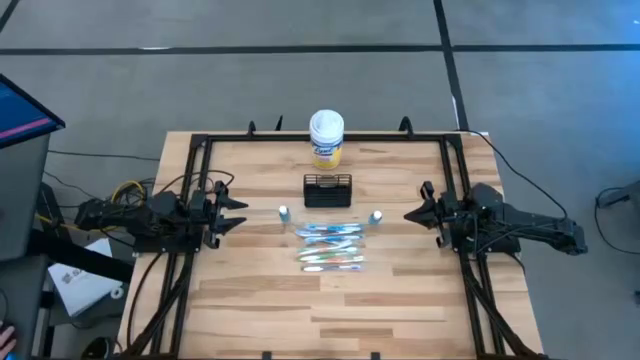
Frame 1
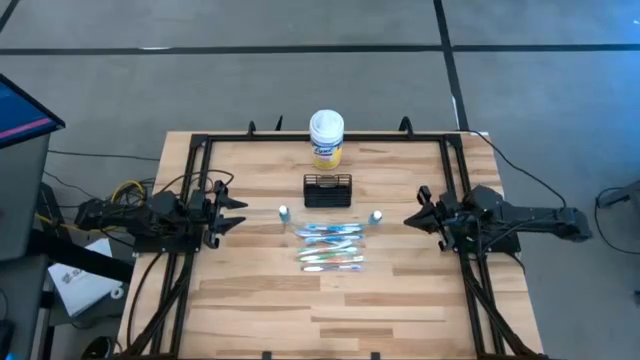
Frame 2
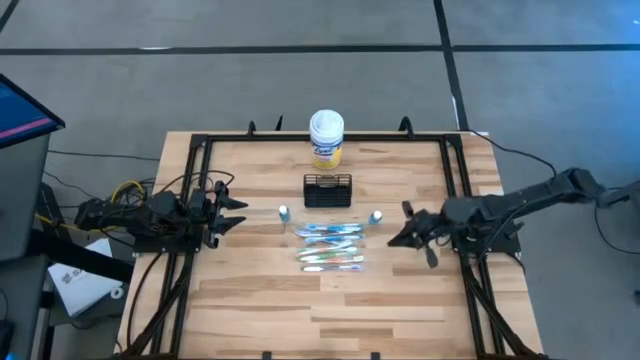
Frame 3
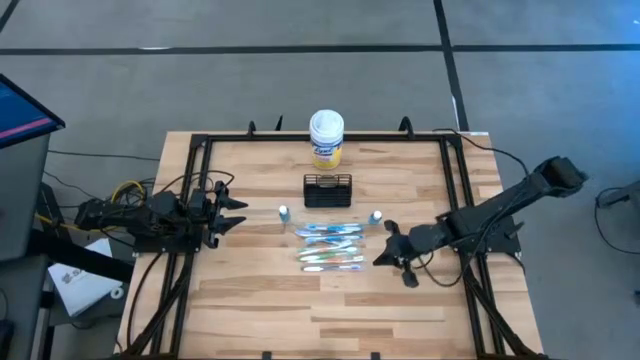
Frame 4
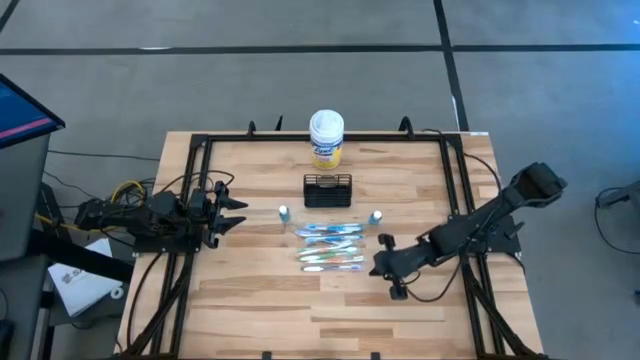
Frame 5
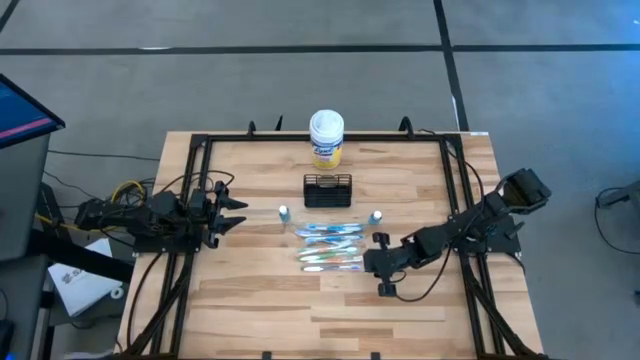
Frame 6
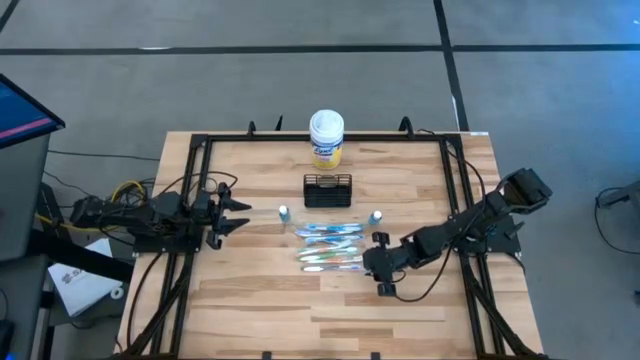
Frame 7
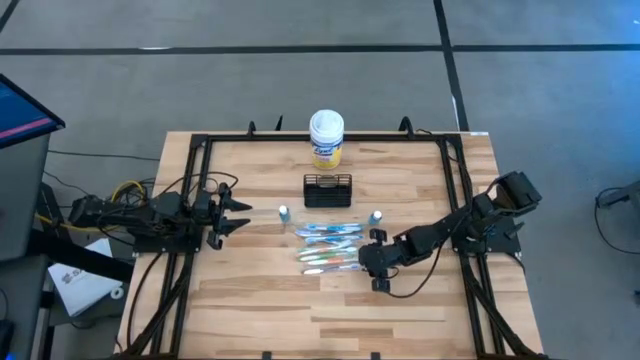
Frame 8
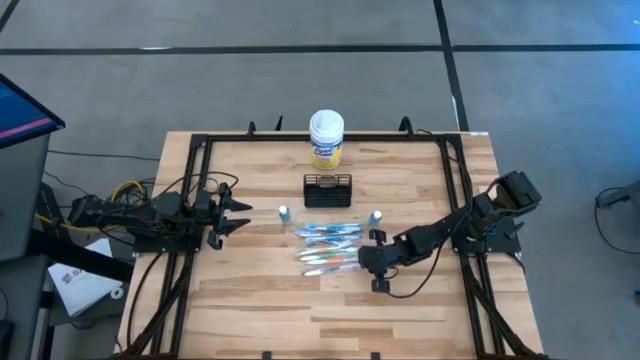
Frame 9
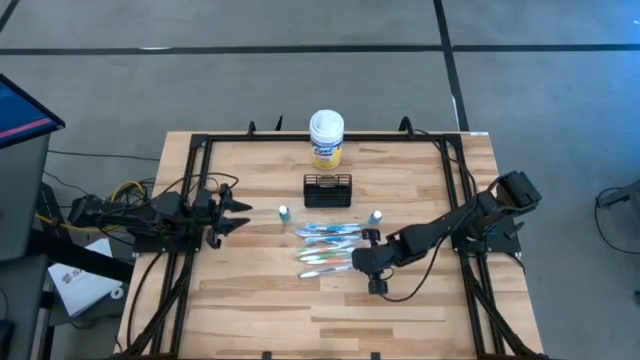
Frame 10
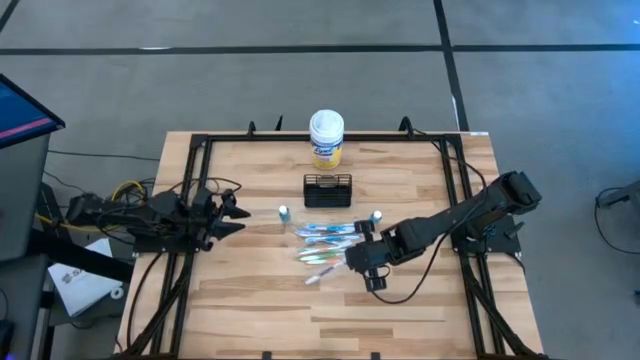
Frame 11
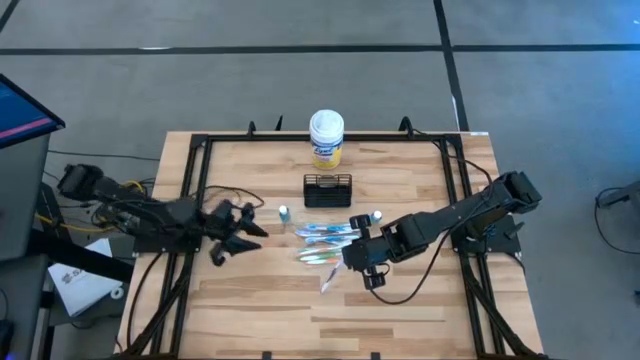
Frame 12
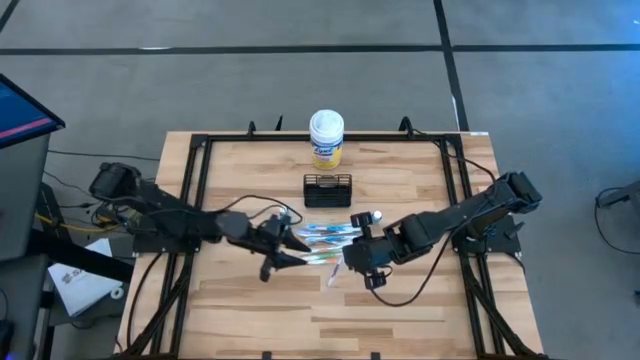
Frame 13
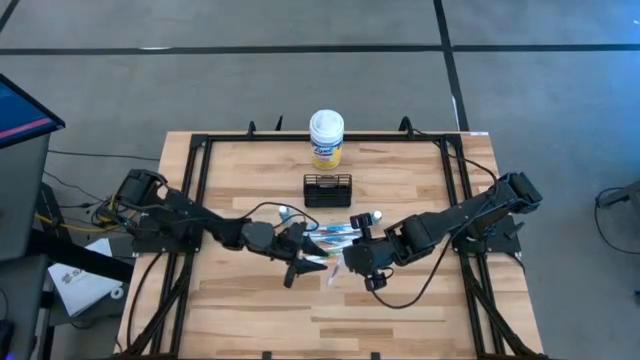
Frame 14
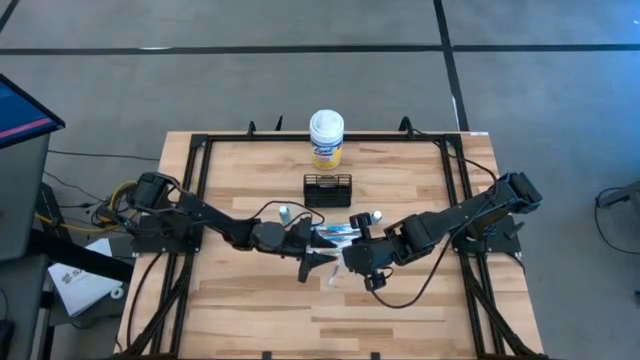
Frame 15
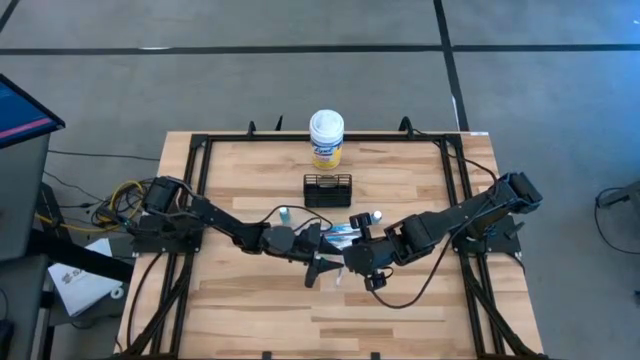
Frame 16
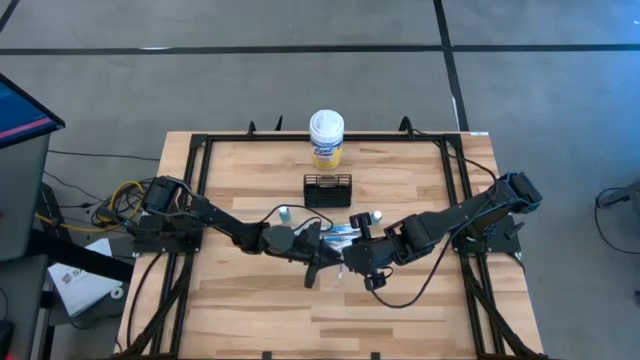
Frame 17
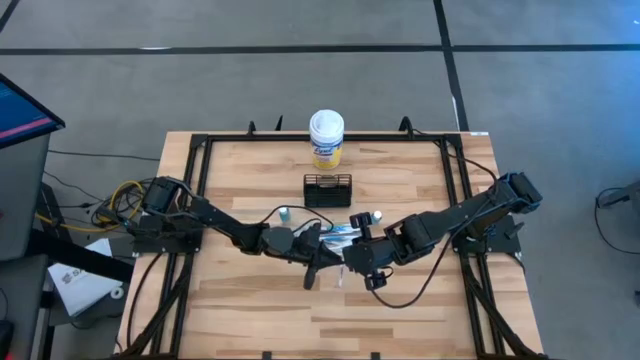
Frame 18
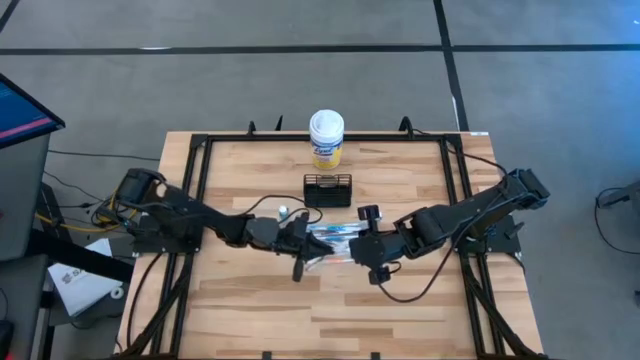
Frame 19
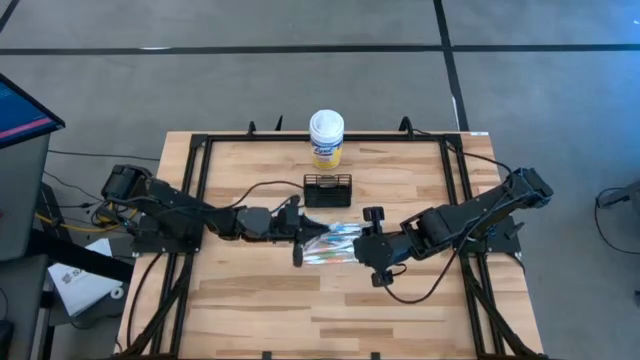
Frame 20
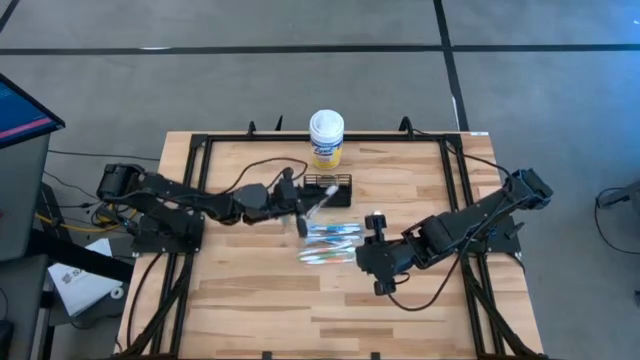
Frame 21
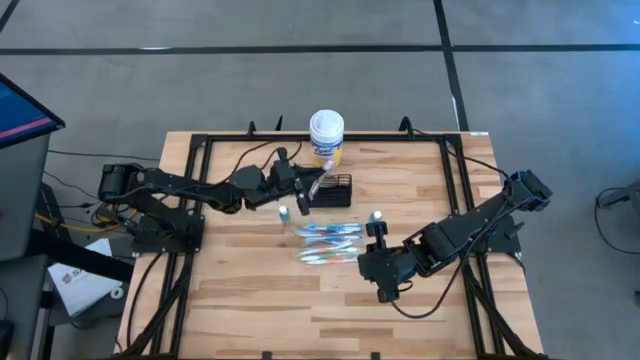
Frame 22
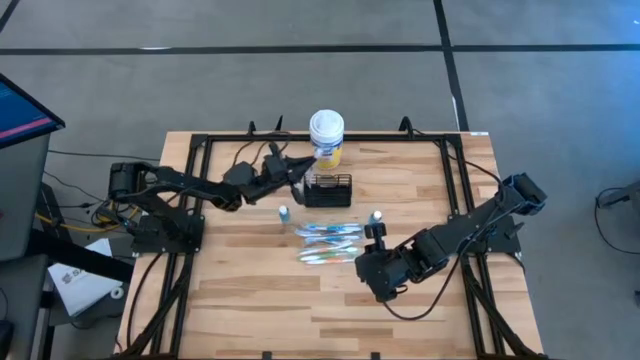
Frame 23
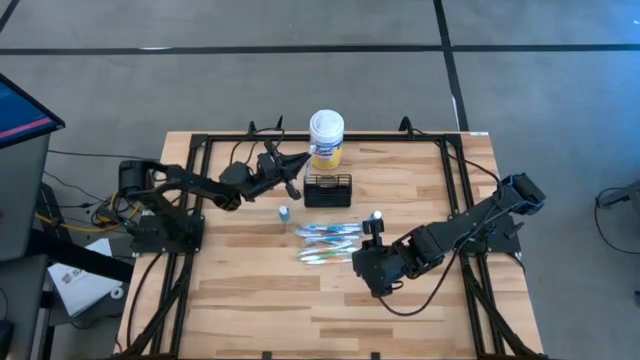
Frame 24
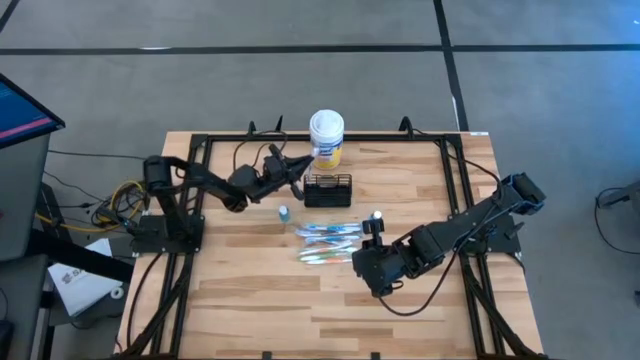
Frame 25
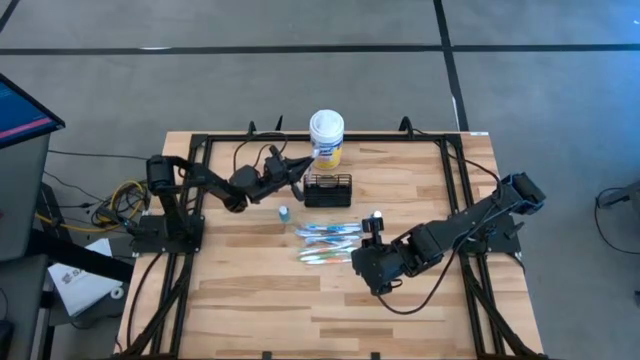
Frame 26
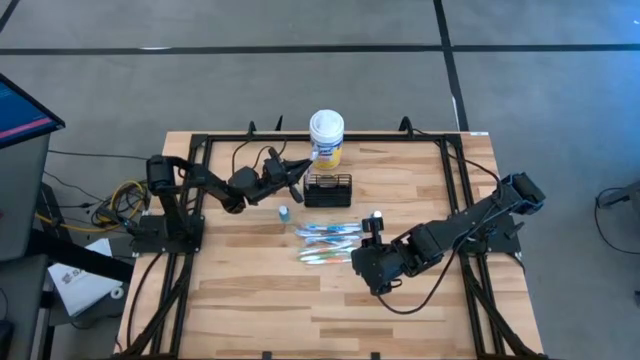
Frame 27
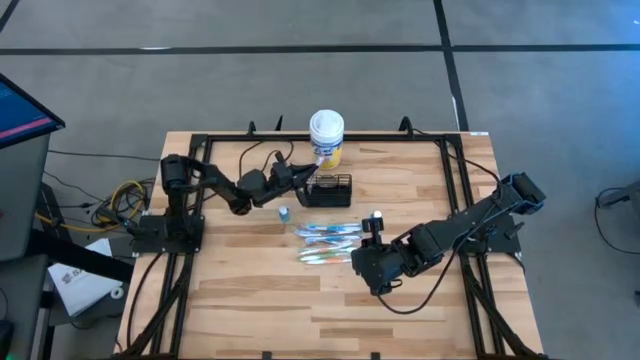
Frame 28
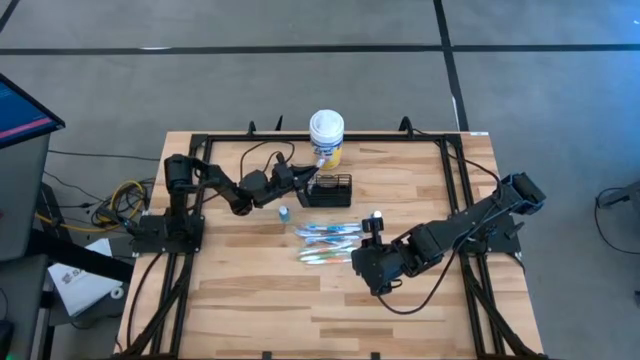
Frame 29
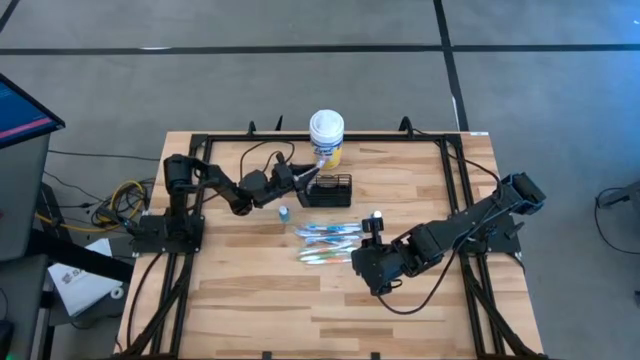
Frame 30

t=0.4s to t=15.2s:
Task: Pick & Place toothbrushing station
Put the violet toothbrush into the black wire organizer

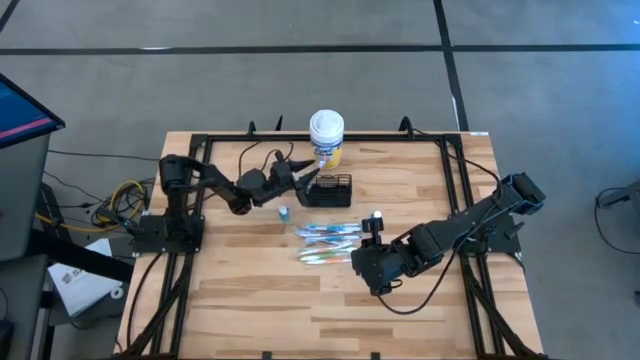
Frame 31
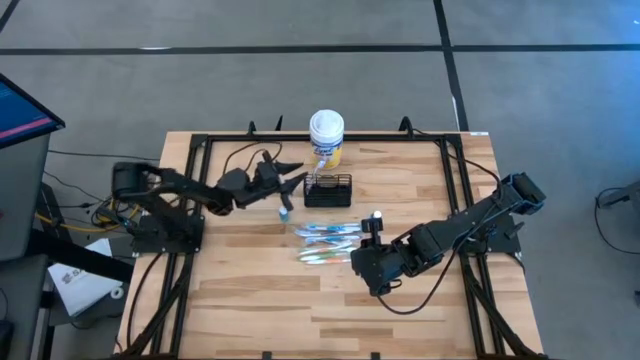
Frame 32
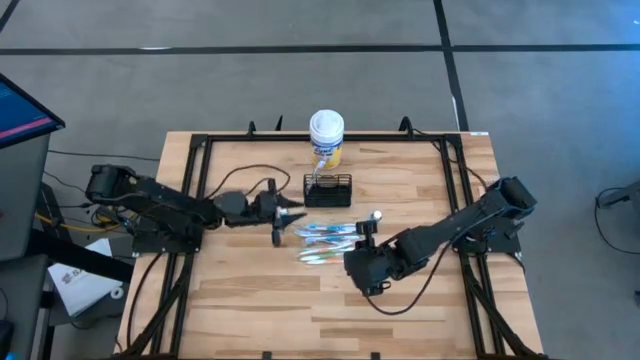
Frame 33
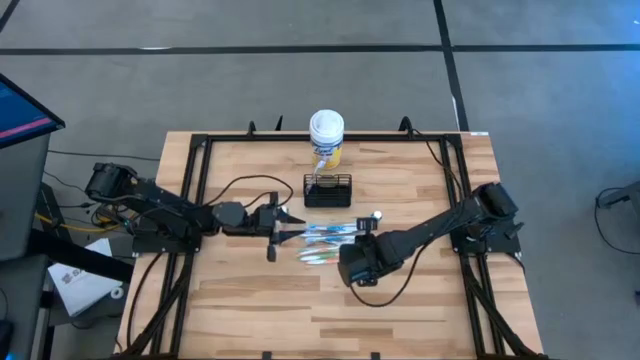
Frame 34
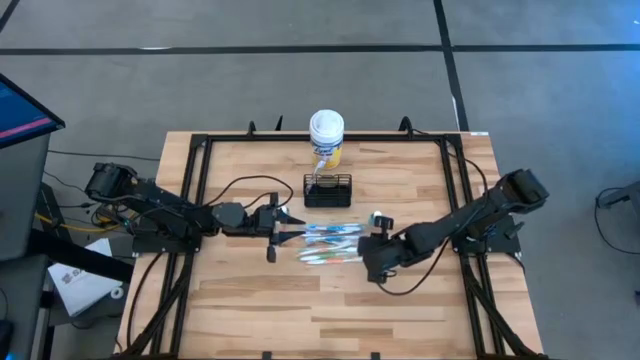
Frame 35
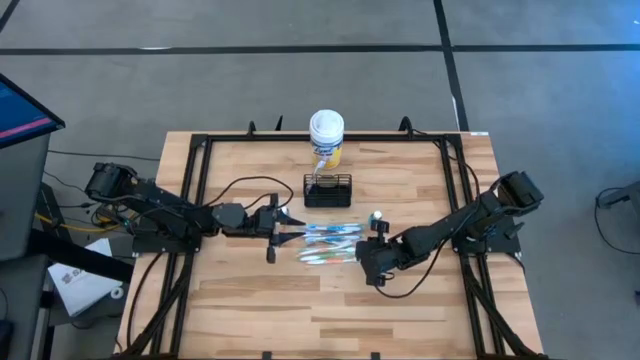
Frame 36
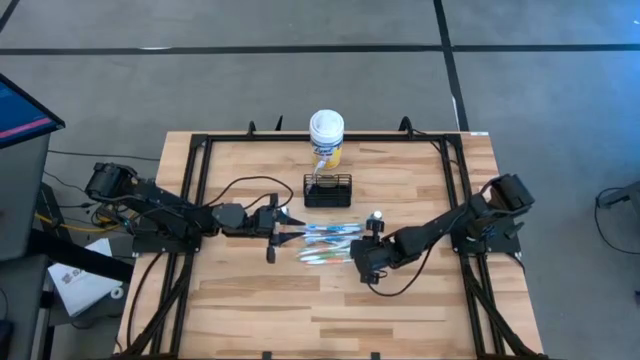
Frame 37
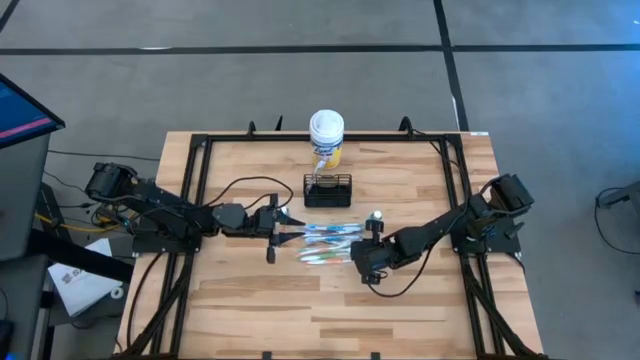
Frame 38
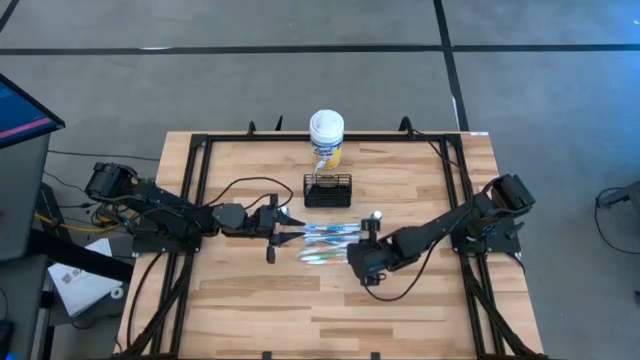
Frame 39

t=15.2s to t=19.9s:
Put the green toothbrush into the black wire organizer

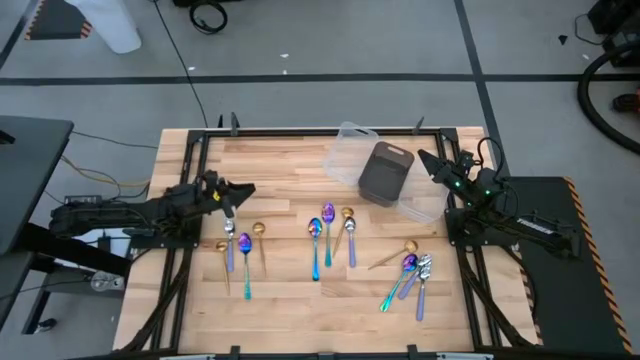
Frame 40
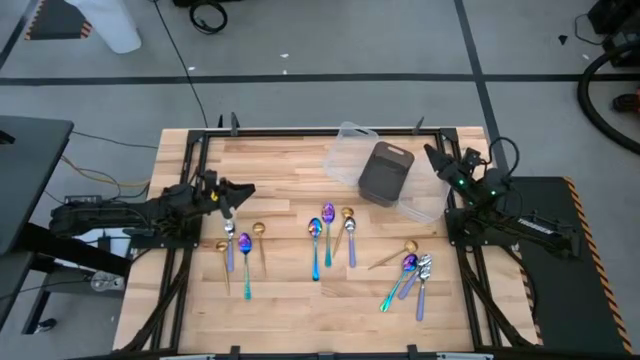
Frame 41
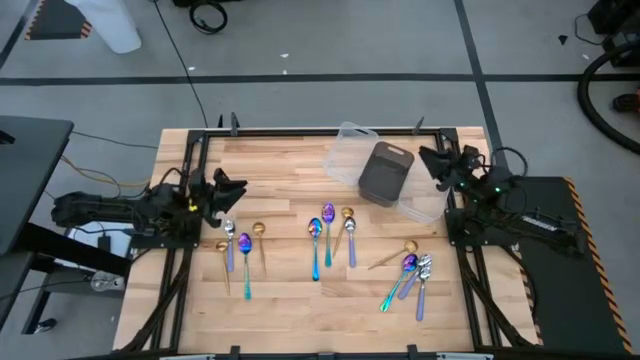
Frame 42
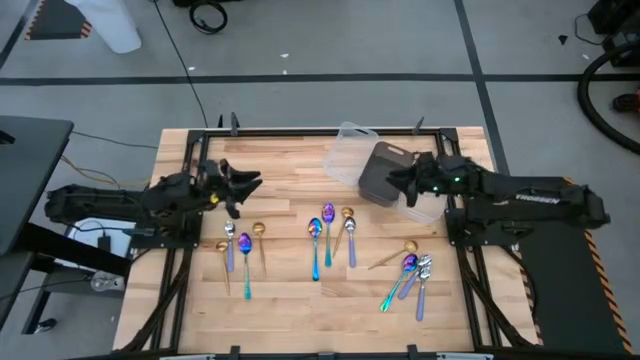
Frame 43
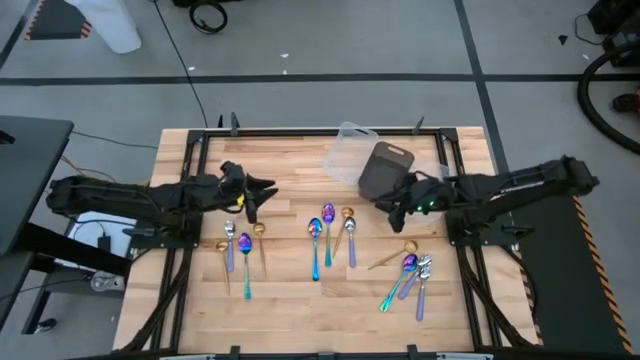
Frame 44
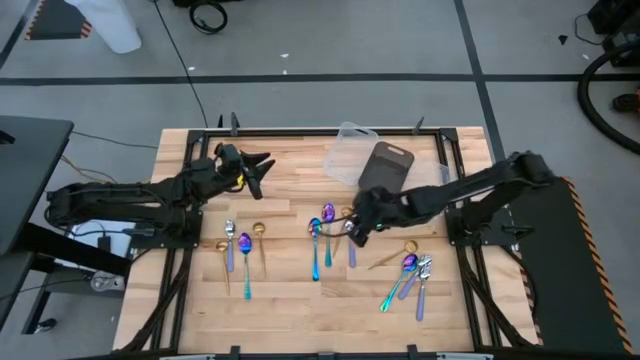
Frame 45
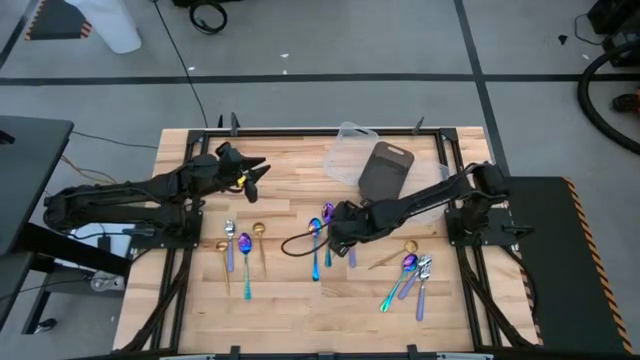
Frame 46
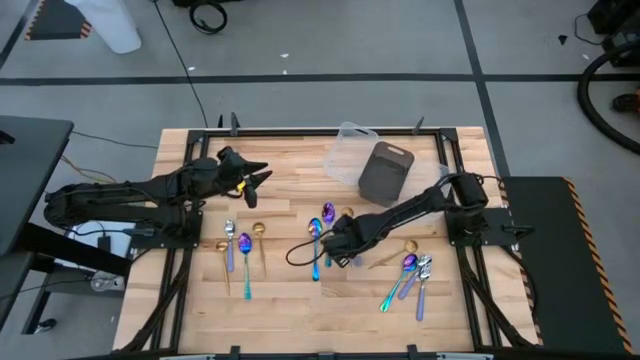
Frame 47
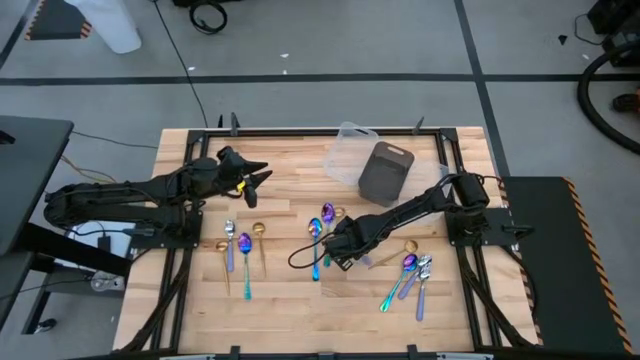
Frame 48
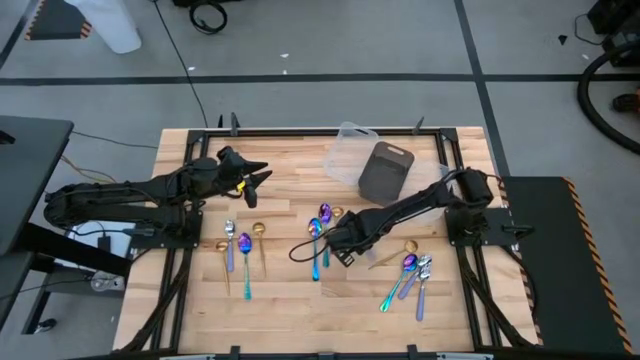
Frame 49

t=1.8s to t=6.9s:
Task: Sort silverware by color (type)
Put the purple spoon into the right transparent bin
